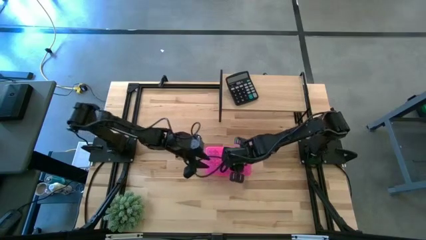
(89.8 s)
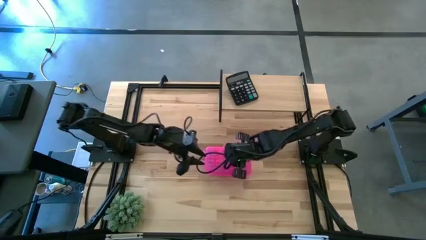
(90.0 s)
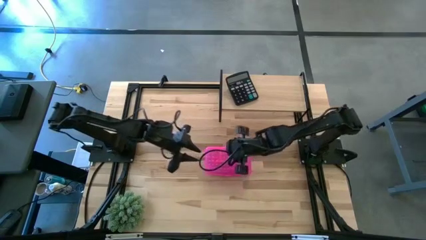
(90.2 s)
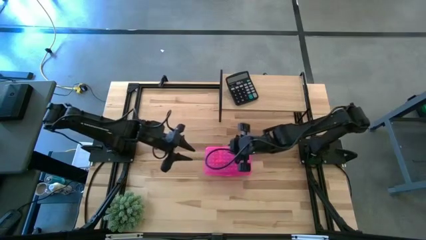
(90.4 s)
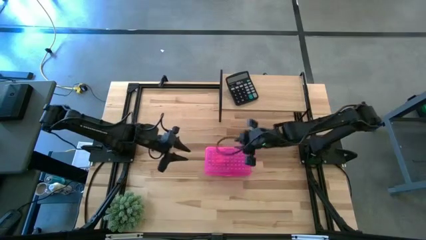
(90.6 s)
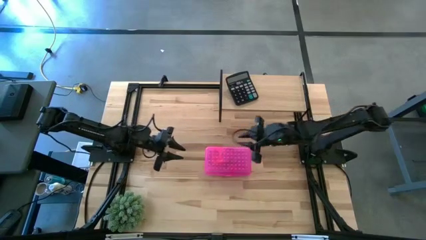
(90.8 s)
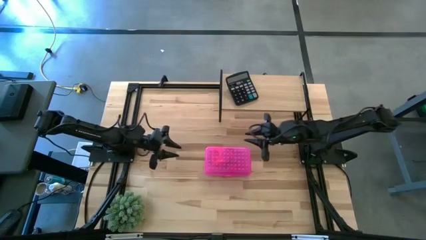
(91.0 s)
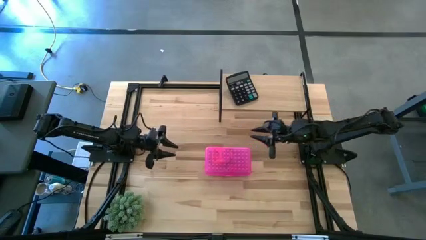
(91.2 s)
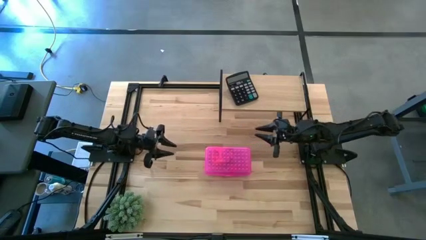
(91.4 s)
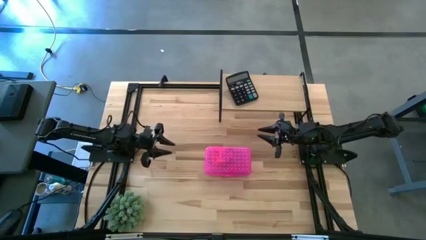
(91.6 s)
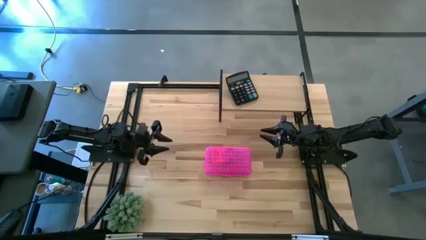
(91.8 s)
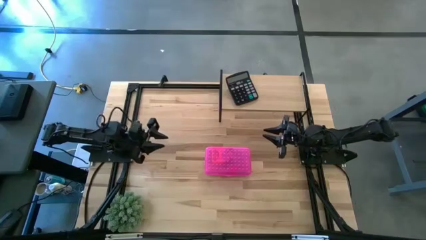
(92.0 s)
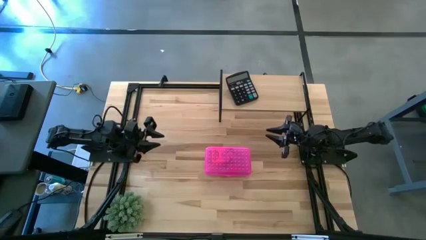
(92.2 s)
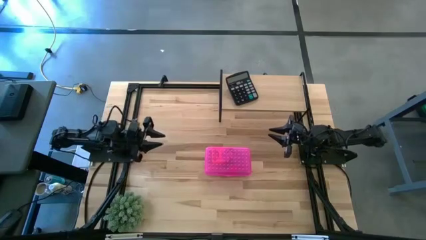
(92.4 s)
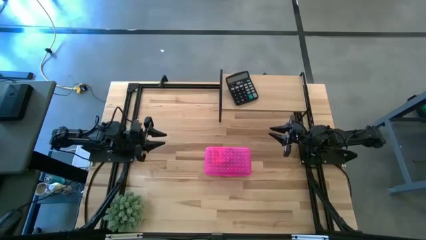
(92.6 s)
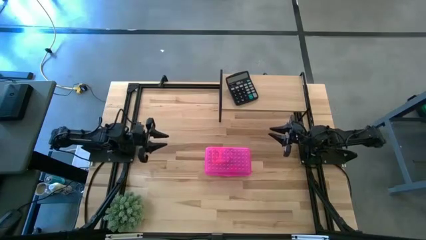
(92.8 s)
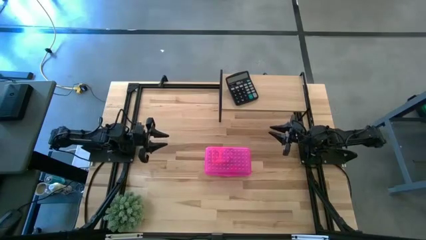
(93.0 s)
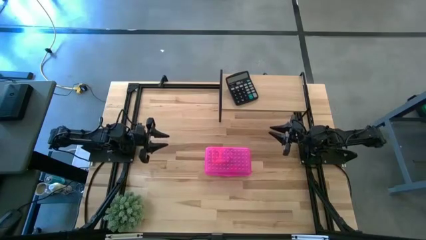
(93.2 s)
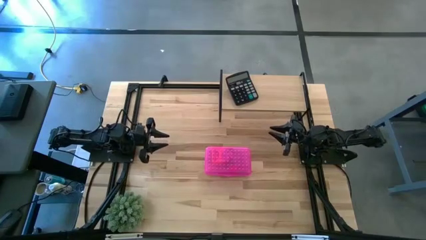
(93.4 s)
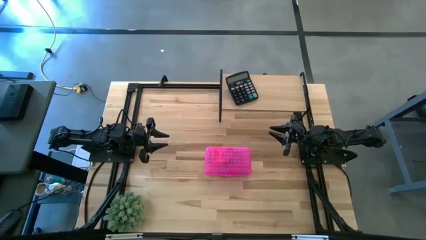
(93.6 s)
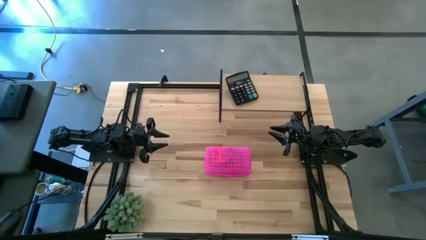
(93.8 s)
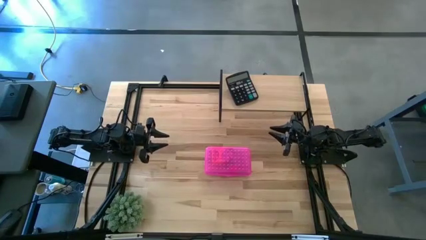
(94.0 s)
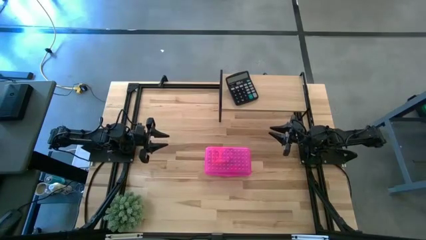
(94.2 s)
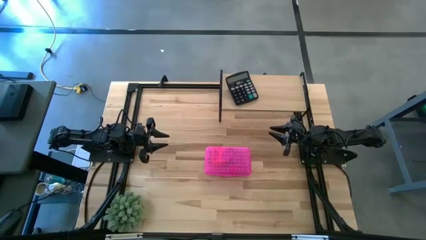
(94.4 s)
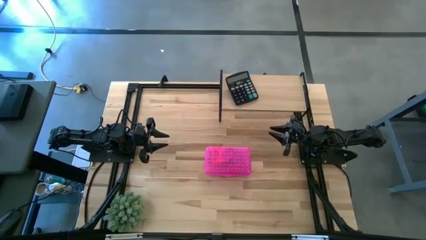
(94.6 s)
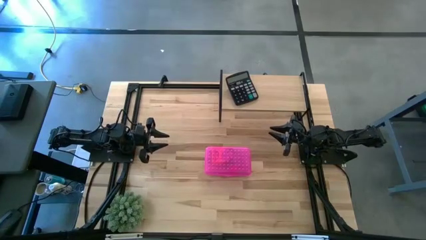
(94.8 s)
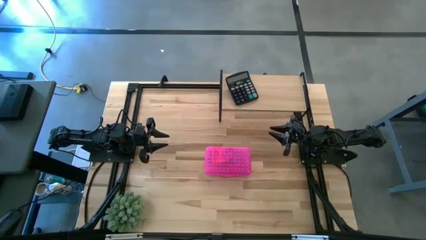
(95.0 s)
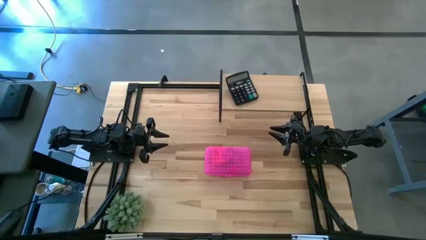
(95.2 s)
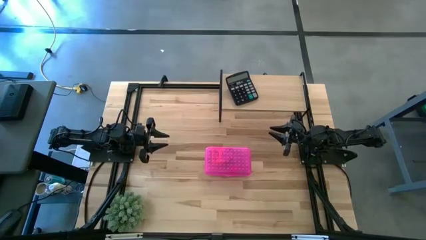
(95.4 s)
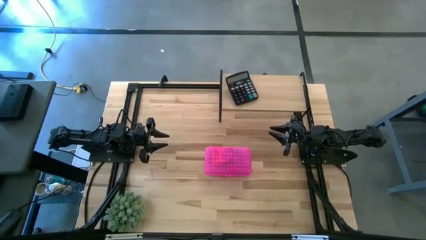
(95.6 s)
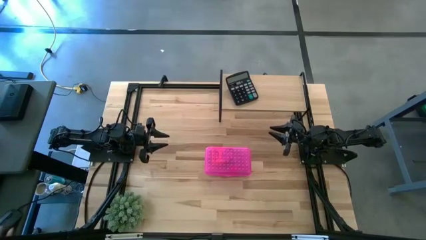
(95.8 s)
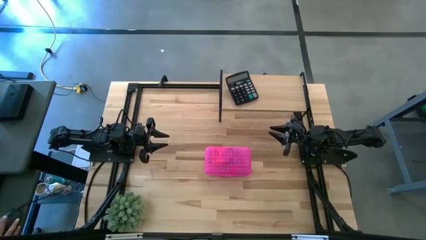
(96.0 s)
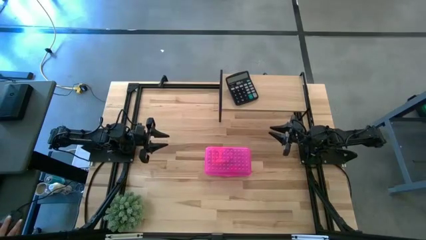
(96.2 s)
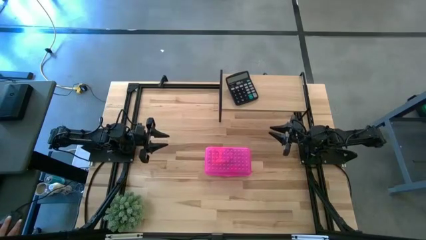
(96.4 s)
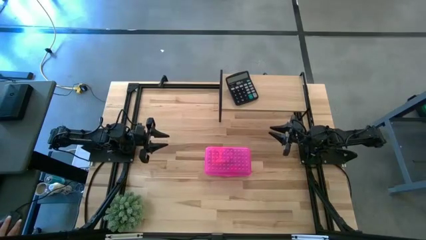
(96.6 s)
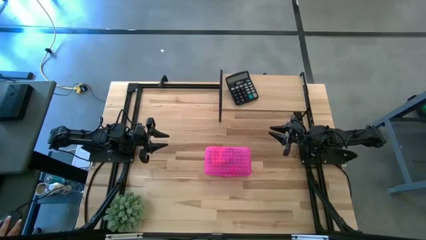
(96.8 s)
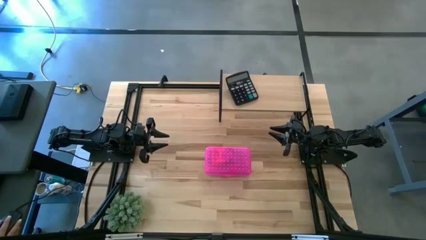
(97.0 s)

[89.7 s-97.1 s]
Task: Pack school essentials
Return to Home Position

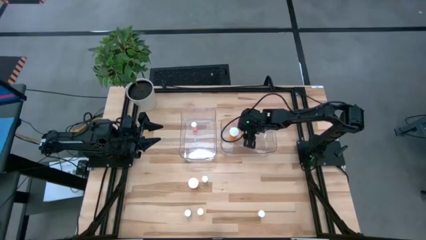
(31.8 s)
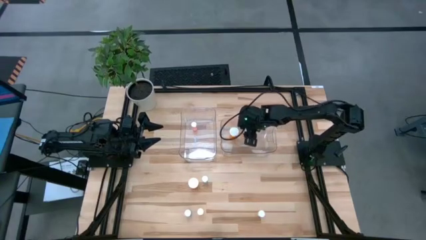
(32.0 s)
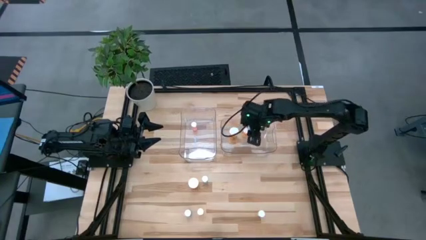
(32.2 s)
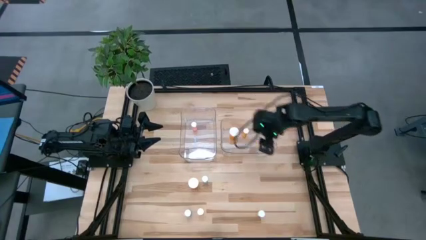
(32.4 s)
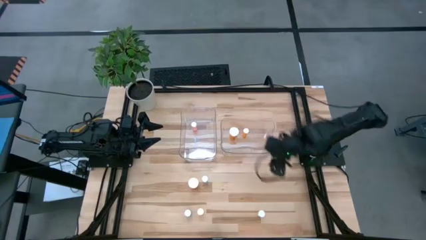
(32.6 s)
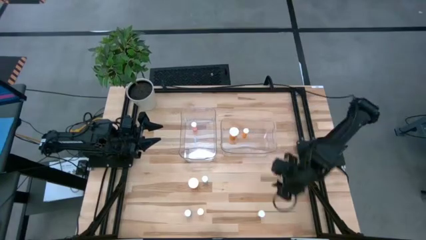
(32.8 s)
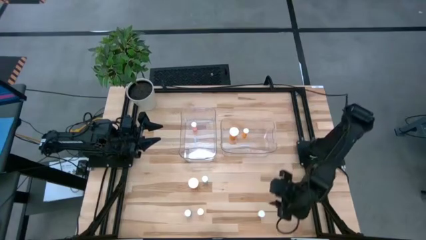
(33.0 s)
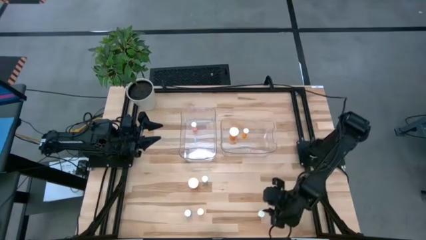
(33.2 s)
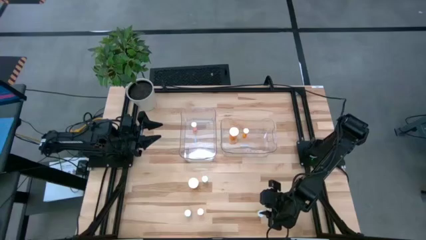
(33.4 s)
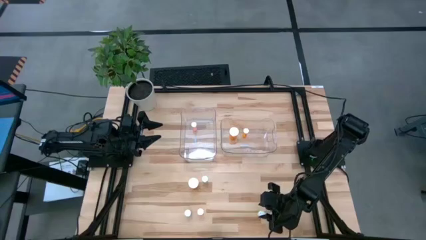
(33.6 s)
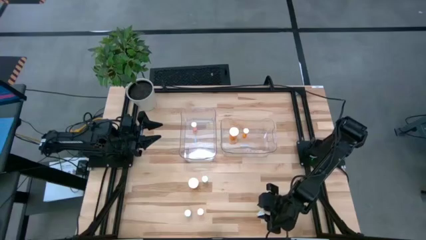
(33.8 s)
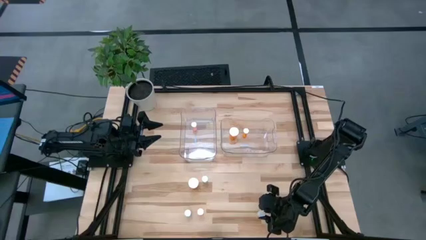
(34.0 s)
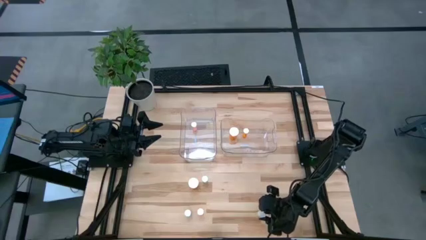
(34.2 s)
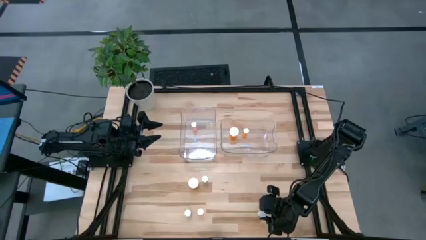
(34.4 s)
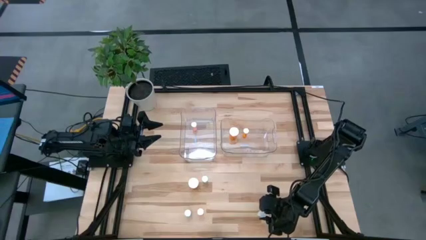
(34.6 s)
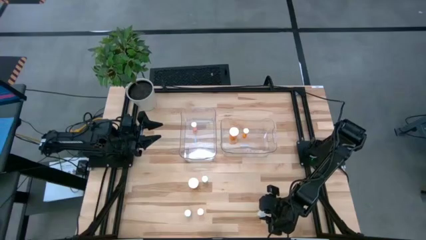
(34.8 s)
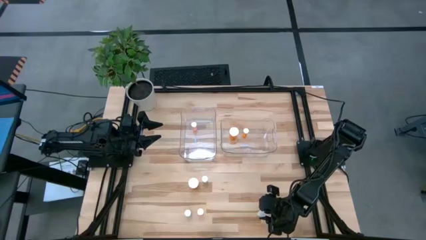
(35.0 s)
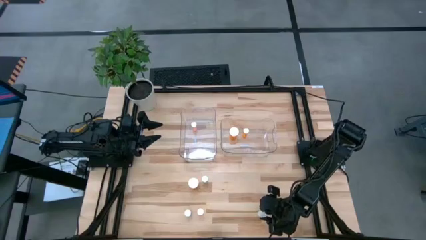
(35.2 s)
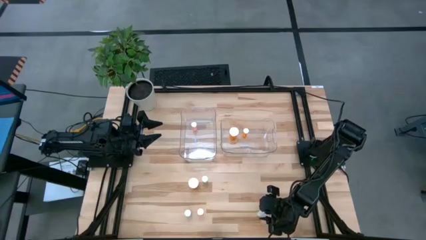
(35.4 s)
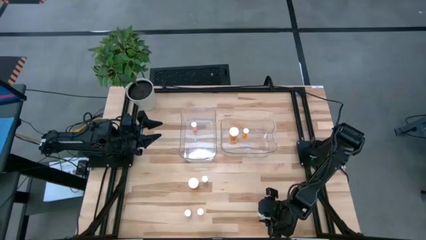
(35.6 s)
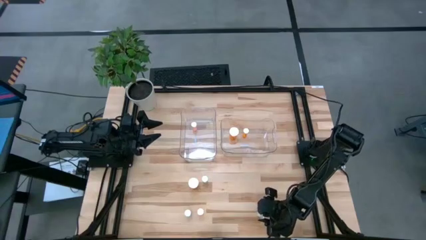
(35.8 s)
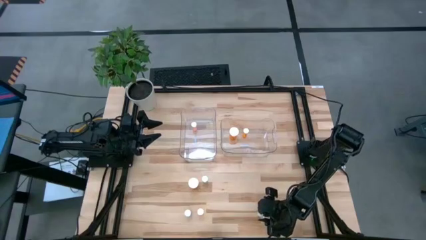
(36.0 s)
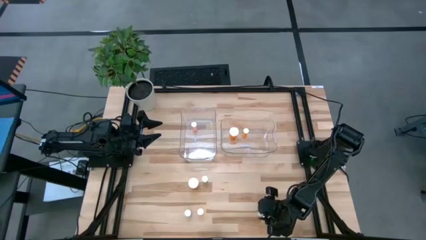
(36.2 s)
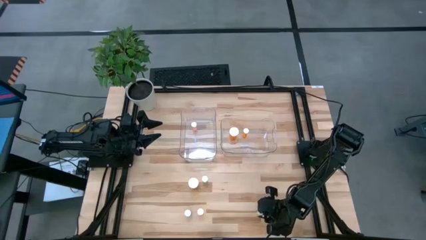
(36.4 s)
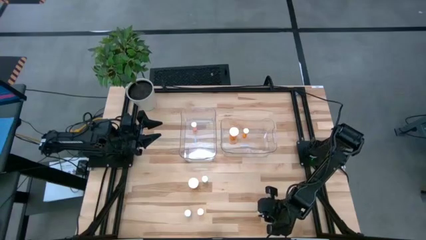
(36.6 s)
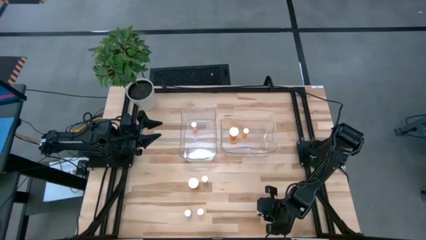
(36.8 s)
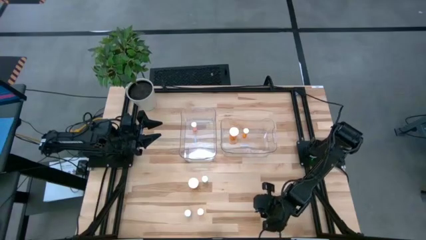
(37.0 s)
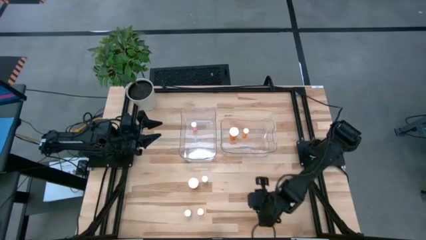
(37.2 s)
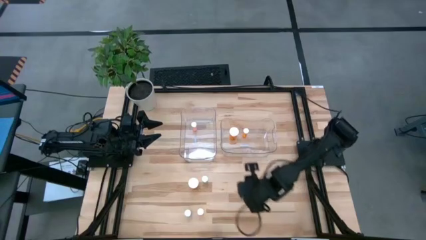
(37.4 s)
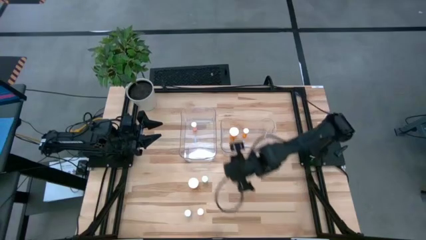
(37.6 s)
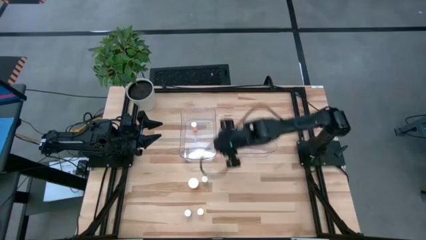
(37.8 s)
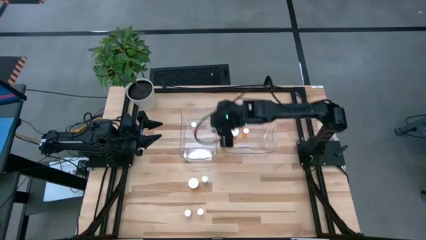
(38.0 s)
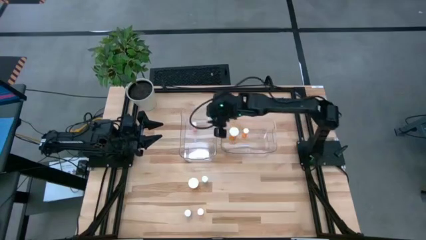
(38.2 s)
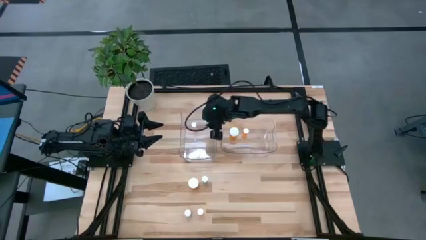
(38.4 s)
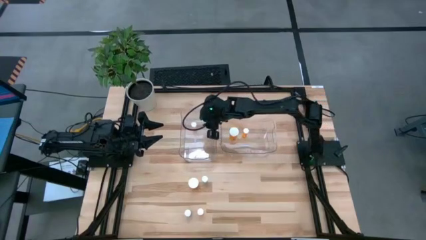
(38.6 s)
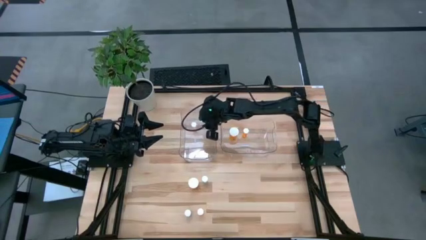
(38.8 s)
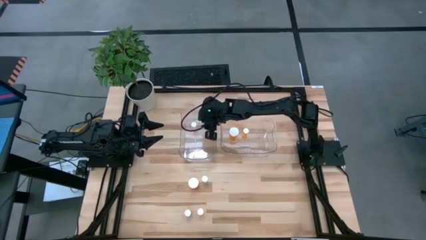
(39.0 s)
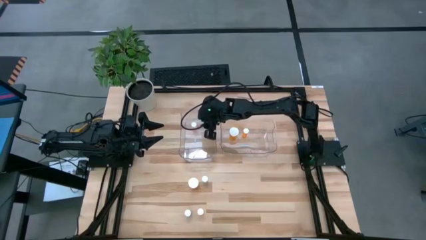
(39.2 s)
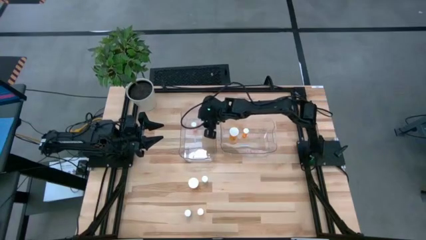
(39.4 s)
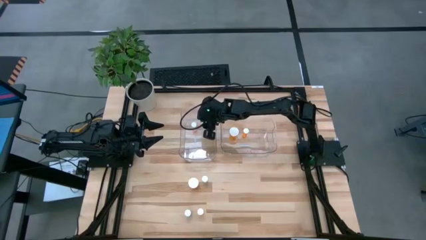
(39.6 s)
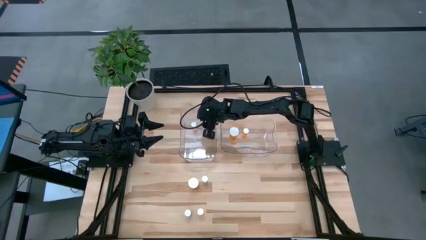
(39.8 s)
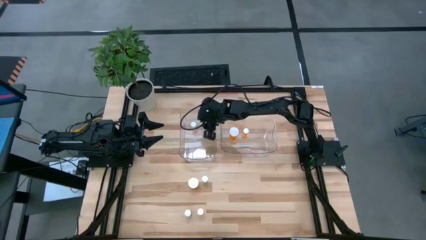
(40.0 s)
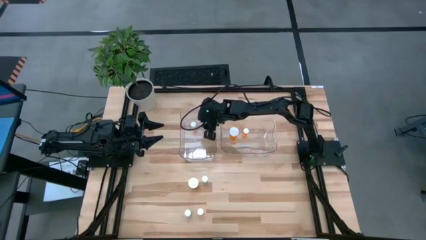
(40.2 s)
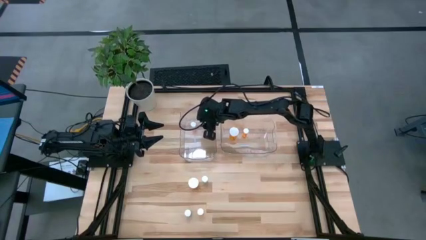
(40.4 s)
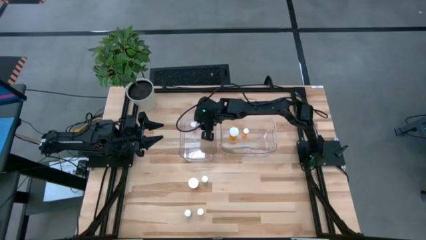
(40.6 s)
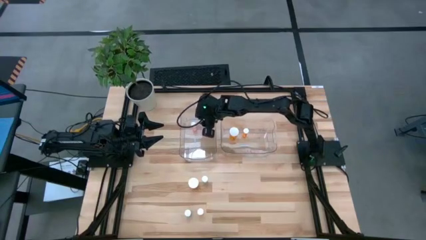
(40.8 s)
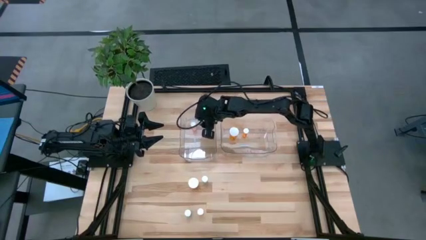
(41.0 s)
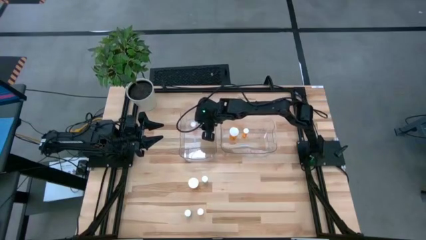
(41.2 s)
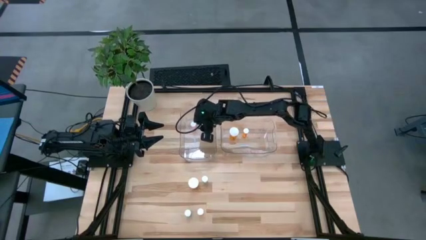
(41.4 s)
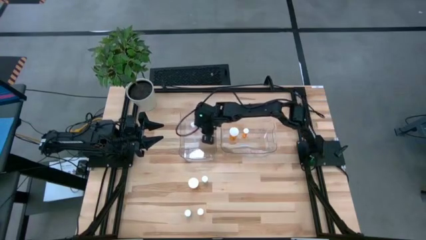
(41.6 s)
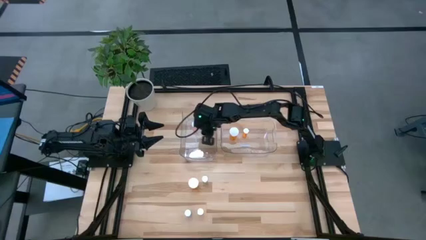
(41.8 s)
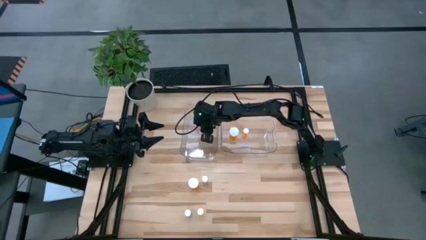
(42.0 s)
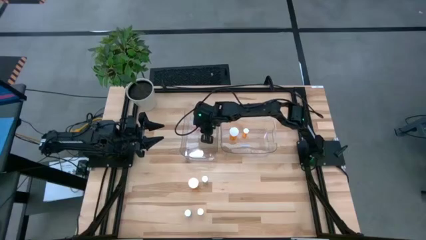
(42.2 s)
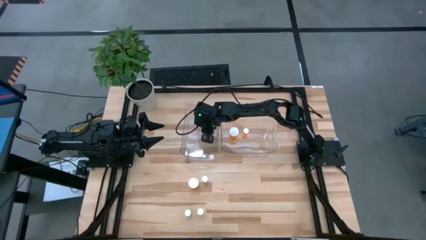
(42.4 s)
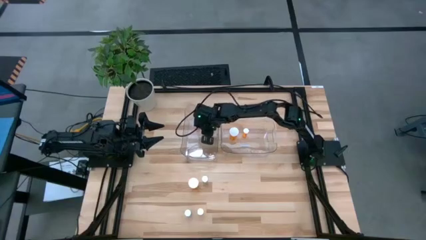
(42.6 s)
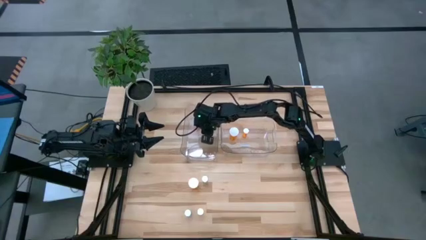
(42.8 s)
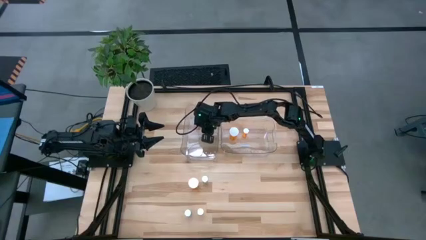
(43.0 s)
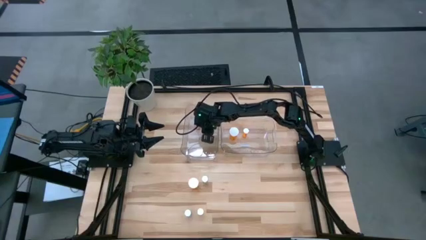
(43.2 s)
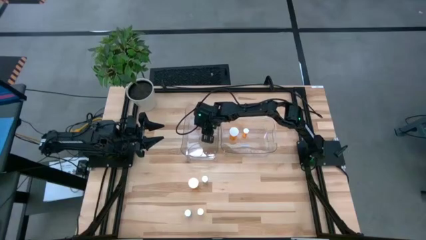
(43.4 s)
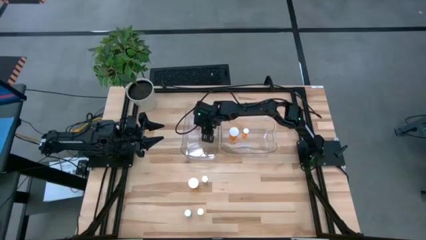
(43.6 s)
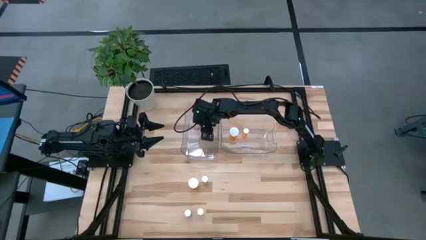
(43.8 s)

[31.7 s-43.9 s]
Task: Pick and place medicine bottles into bin by pill shape (circle, oval)
Put the yellow pill bottle into the left transparent bin
